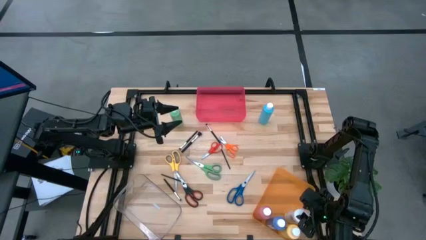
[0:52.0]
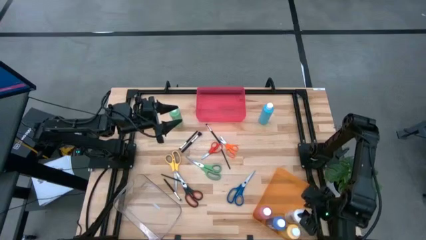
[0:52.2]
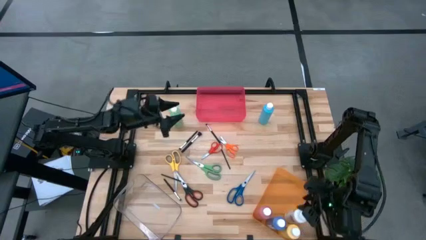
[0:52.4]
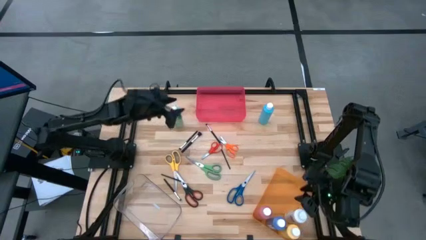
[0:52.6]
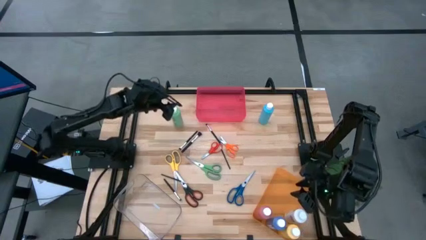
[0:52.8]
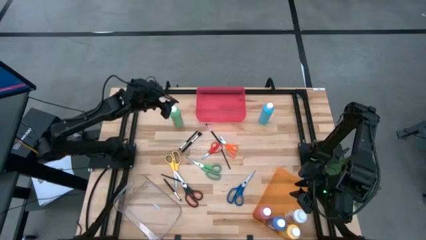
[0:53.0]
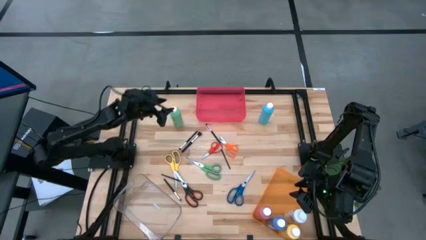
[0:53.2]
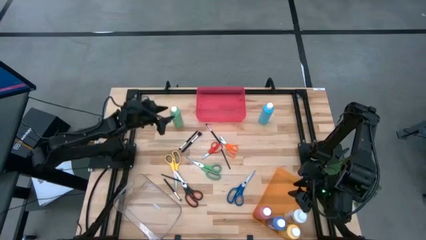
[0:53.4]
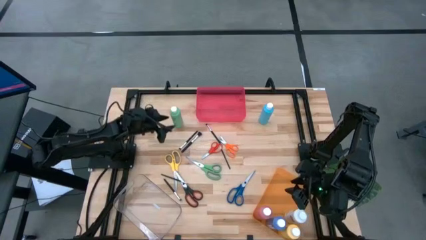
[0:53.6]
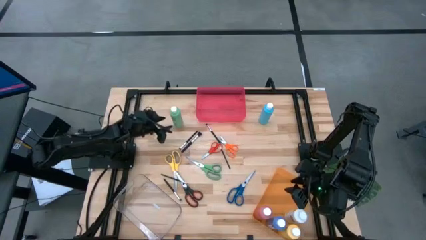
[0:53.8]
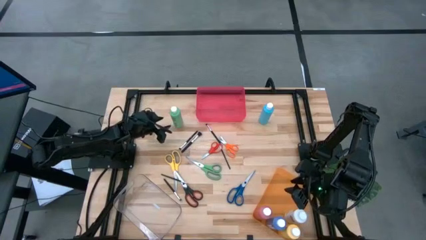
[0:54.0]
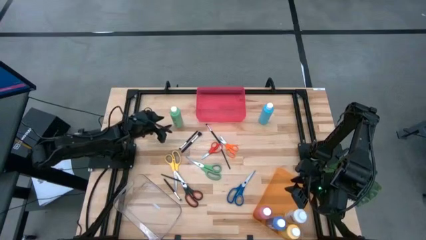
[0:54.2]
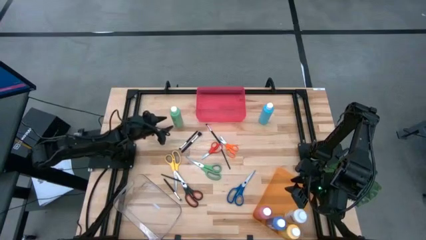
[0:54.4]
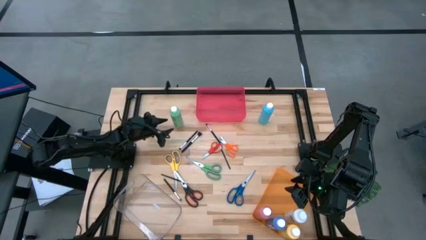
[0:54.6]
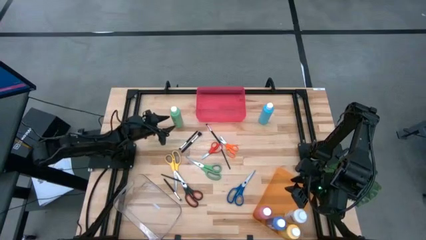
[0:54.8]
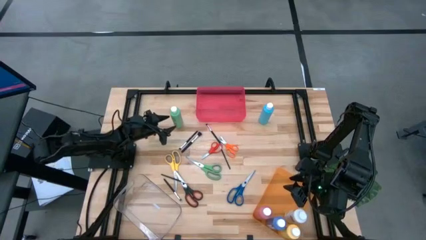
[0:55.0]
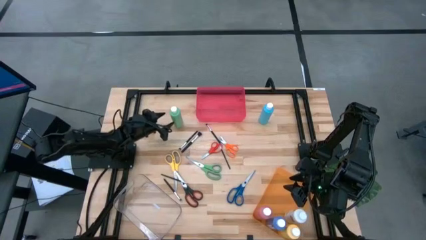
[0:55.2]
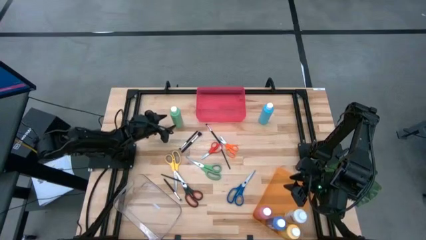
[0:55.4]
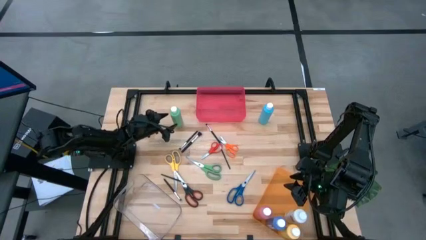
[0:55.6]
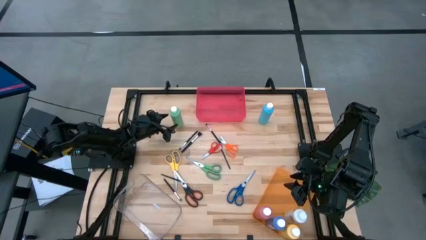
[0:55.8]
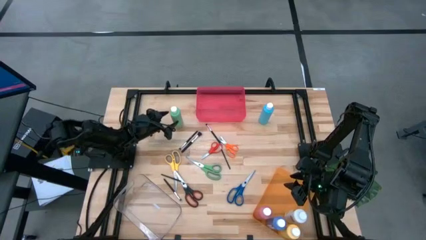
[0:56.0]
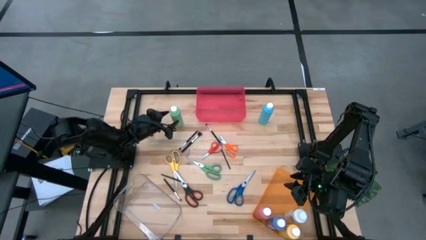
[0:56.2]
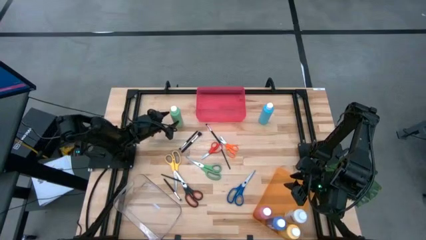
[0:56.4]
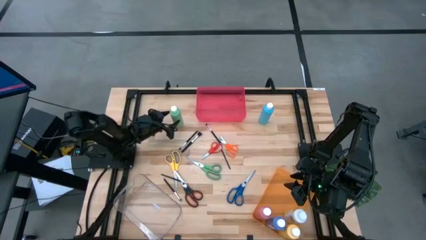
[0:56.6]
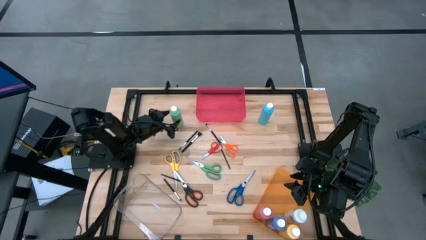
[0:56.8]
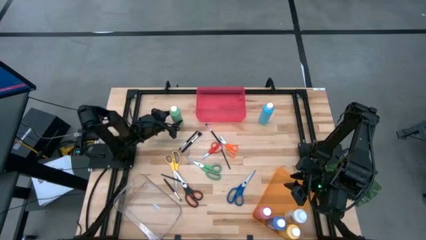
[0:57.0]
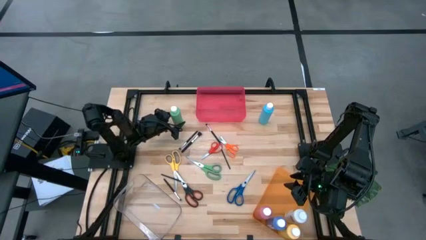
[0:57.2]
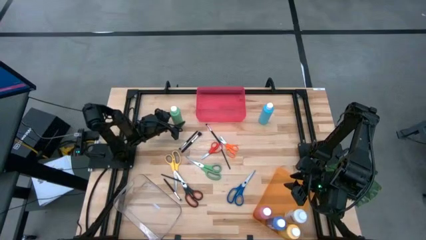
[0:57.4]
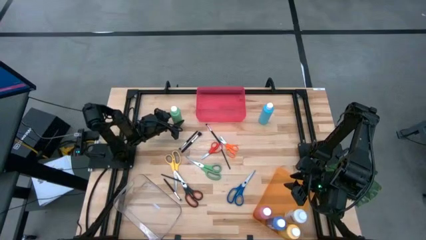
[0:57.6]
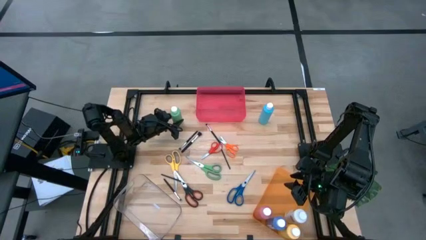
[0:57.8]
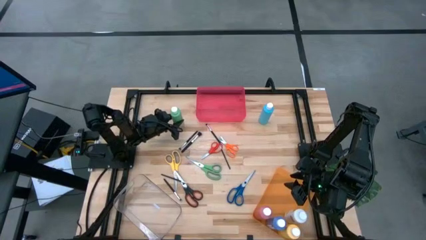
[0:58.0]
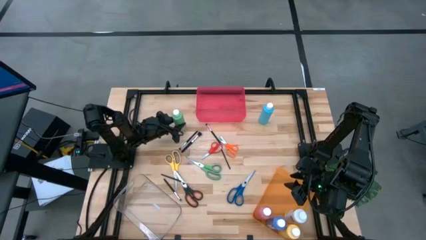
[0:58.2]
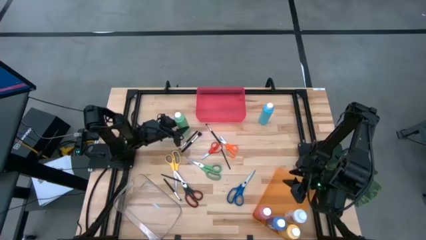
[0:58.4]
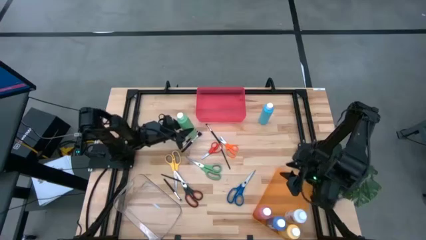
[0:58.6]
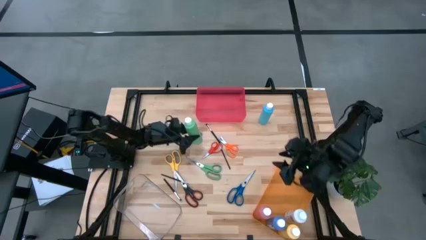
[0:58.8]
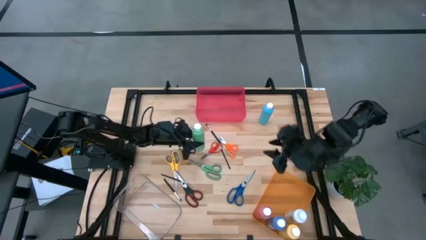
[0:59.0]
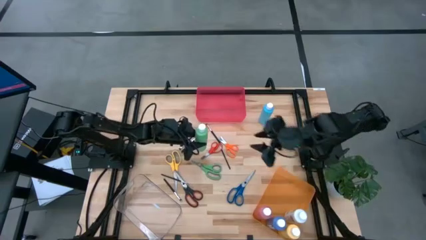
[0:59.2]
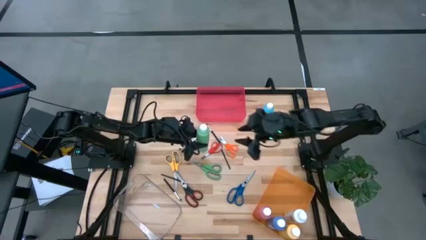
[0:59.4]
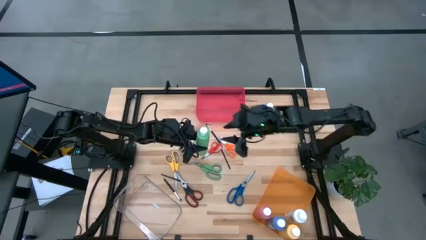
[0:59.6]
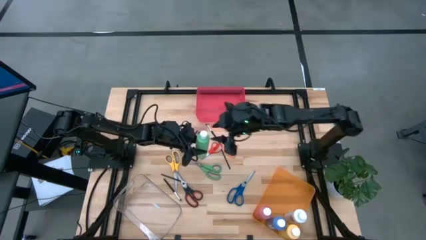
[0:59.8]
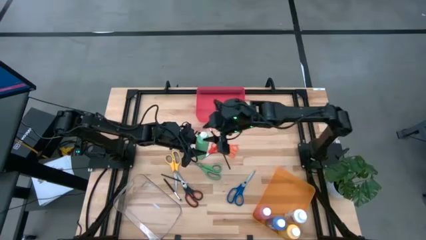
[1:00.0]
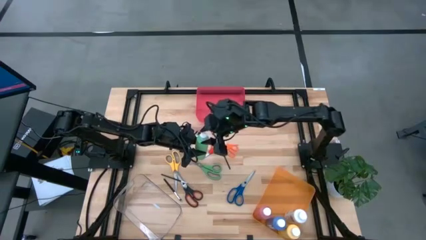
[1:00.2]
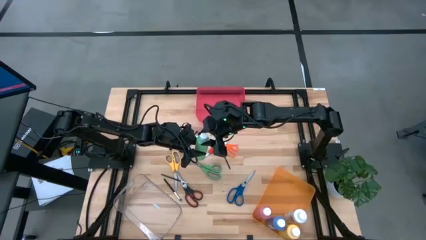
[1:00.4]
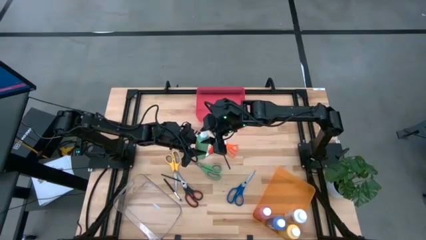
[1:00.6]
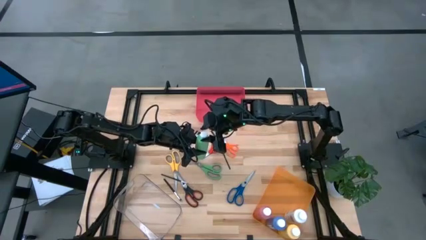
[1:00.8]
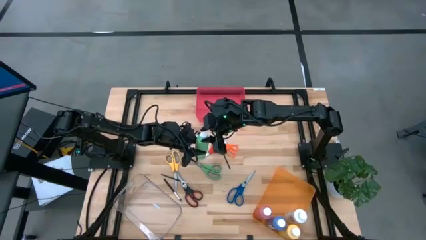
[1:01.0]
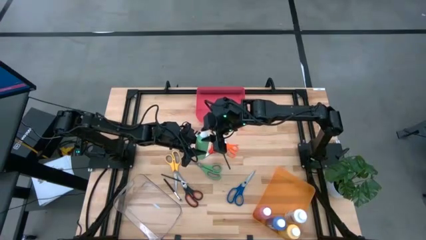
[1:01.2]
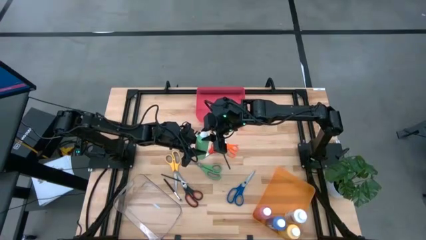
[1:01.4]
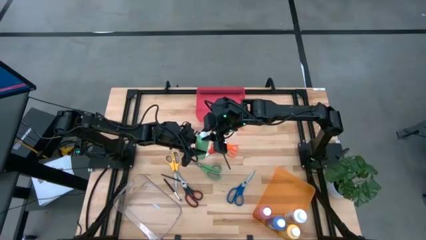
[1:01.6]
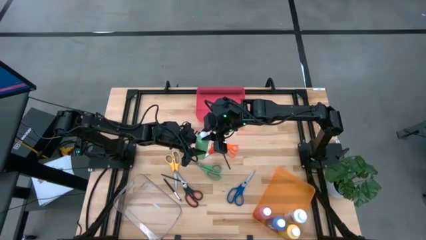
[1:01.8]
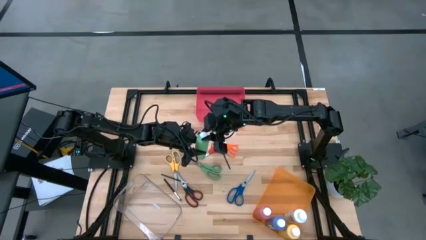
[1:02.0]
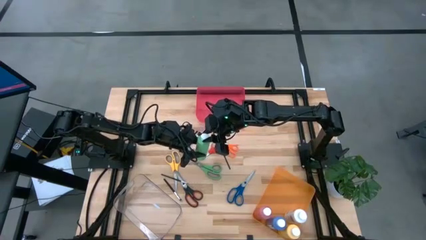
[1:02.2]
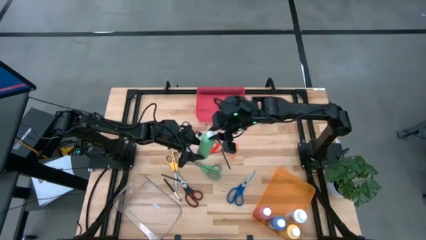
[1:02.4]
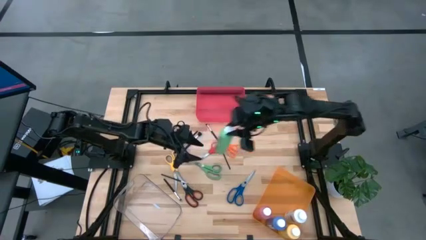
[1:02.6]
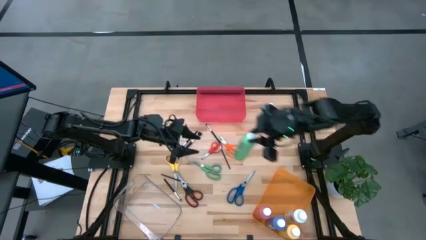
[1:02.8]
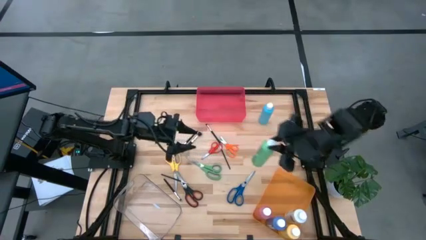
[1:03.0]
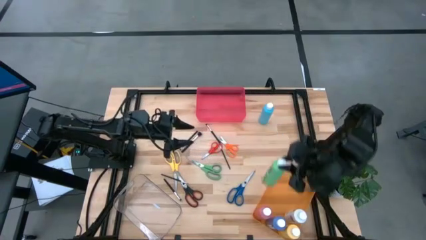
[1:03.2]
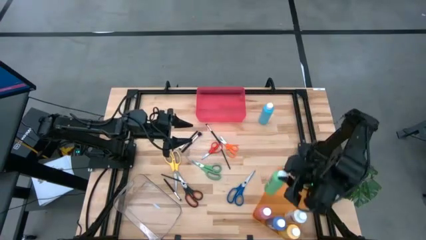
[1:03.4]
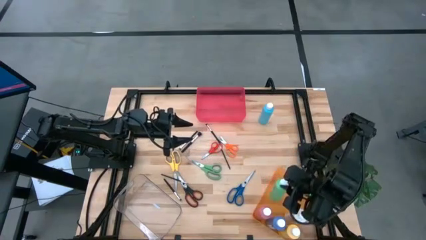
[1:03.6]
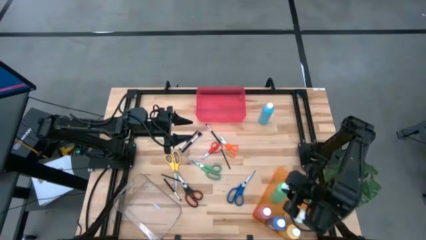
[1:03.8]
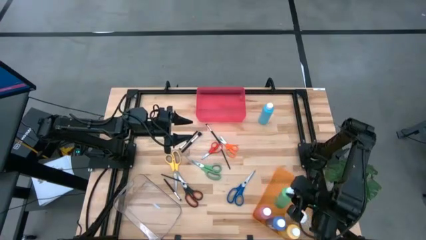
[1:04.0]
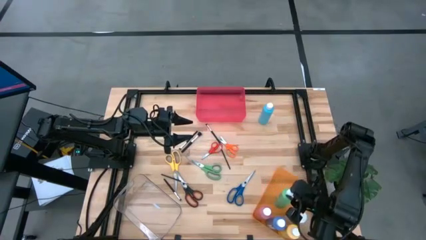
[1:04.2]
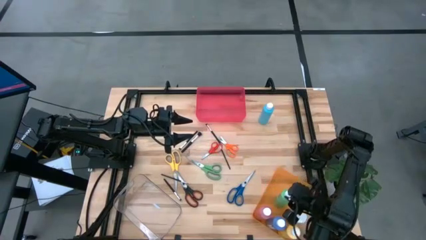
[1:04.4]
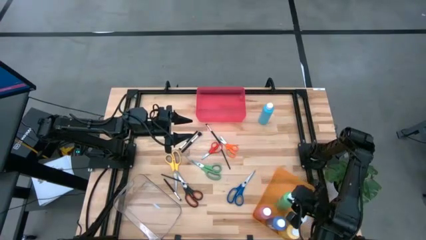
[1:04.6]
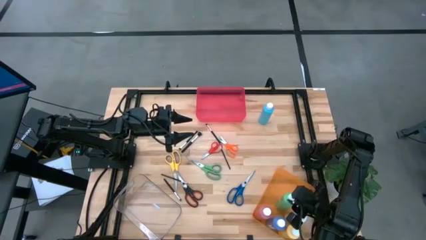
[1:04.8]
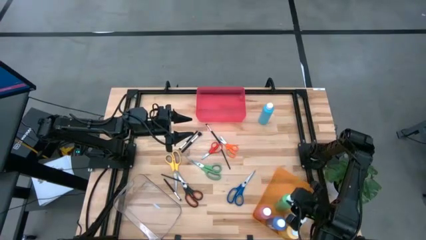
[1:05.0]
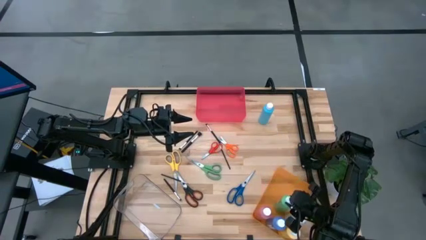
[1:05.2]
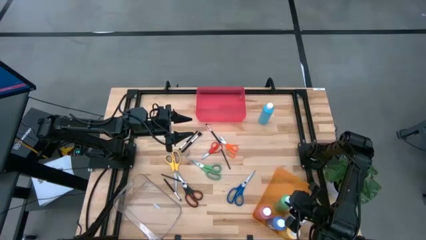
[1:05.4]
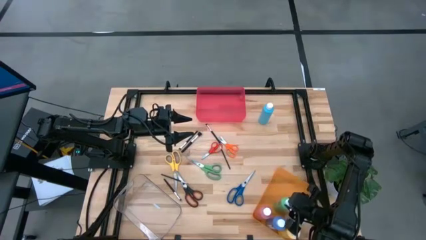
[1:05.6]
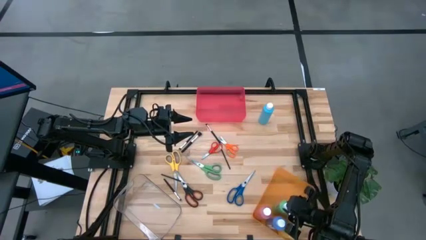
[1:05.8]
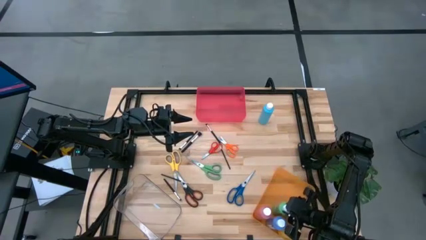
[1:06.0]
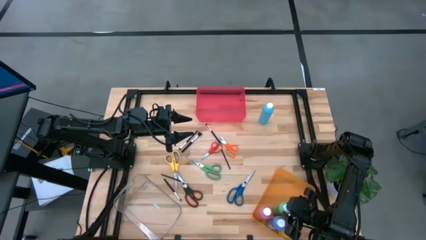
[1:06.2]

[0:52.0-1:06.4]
Task: Pick & Place Paint Supplies
Put the green paint bottle into the orange bin

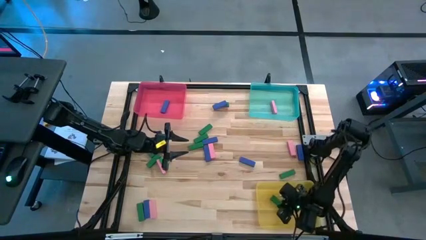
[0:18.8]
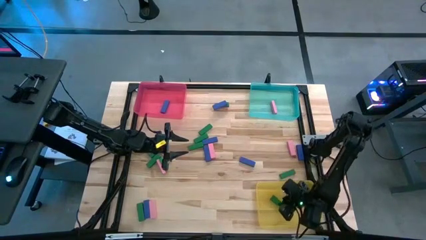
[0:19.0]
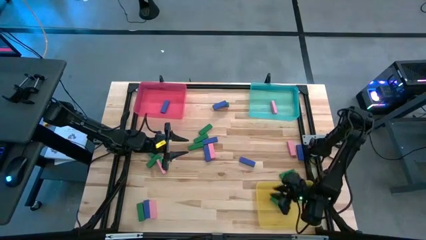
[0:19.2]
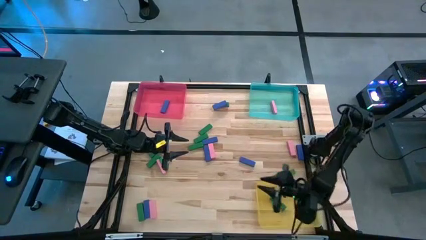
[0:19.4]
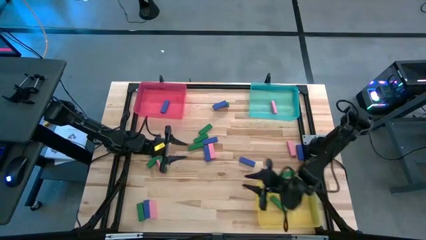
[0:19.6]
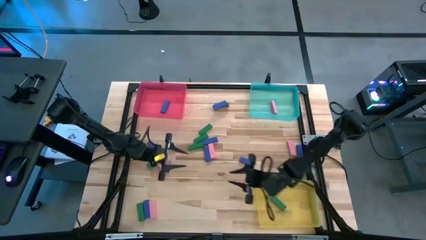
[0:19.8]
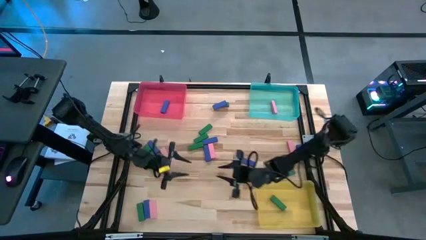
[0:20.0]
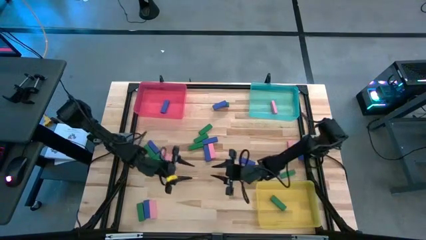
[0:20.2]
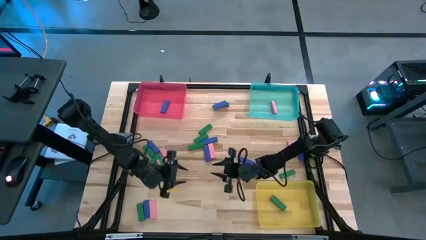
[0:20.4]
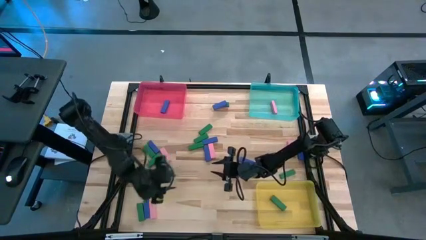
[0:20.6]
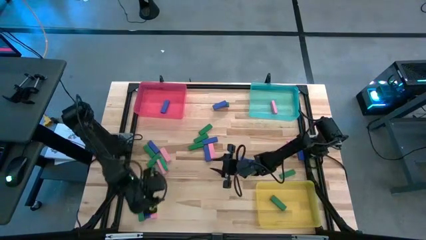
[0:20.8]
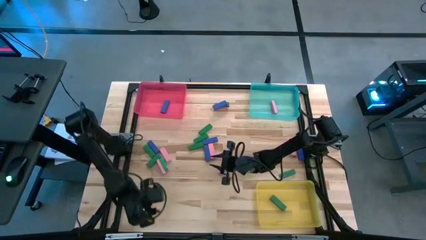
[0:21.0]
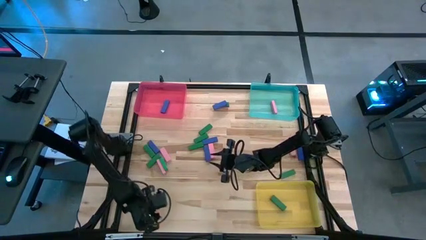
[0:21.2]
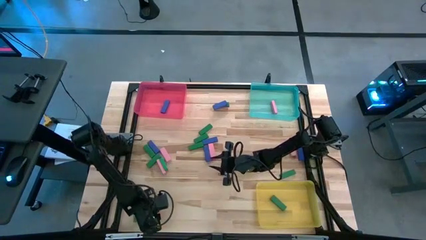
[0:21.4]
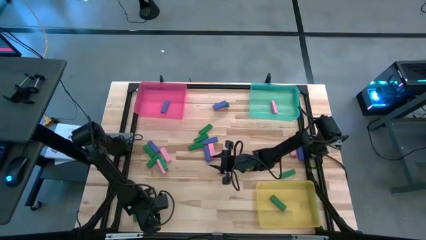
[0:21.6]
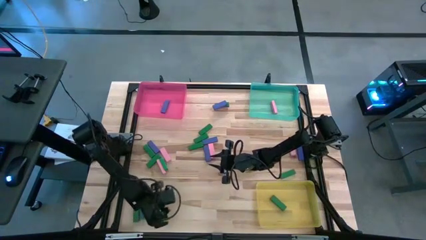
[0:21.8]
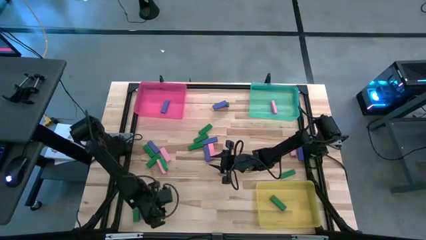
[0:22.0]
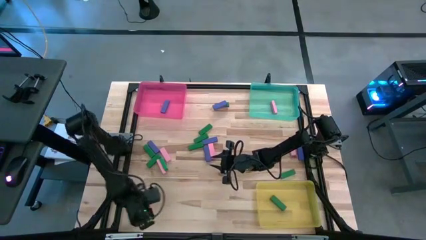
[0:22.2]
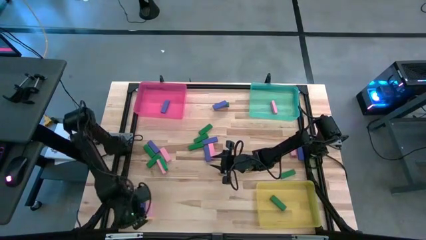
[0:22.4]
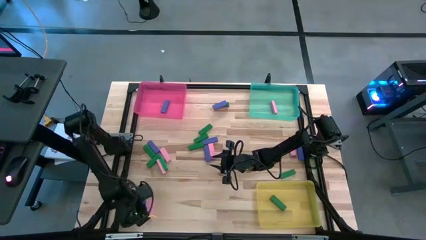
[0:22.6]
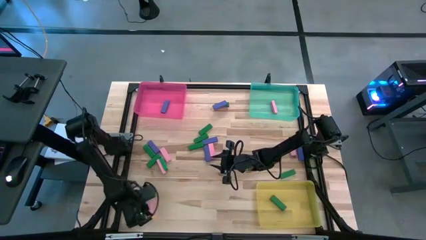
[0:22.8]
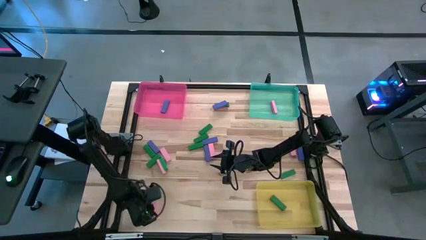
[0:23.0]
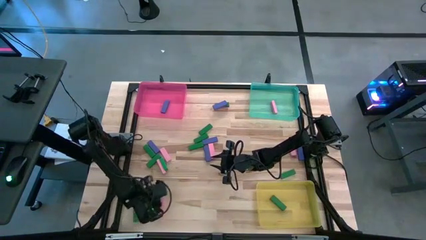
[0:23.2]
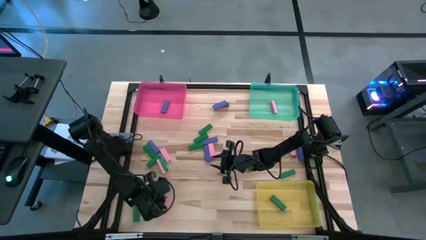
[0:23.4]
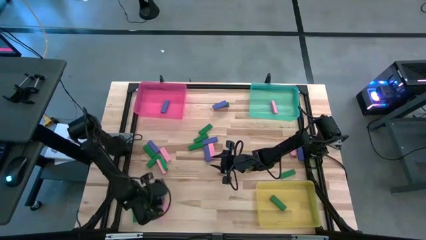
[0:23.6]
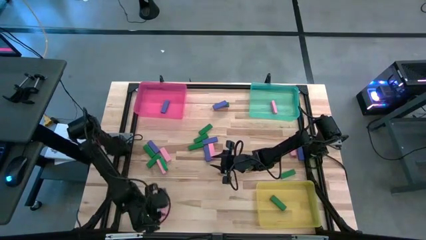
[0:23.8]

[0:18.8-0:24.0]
Task: Sort blocks
Put the pink block into the blue bin
